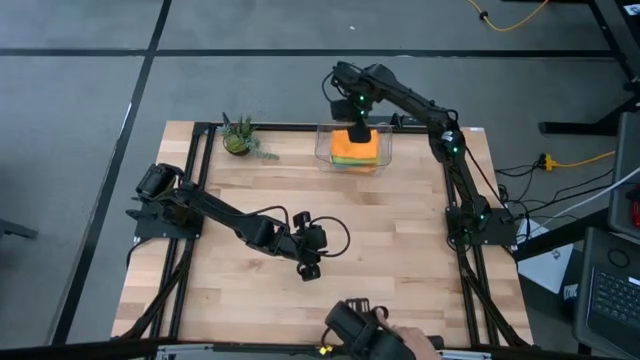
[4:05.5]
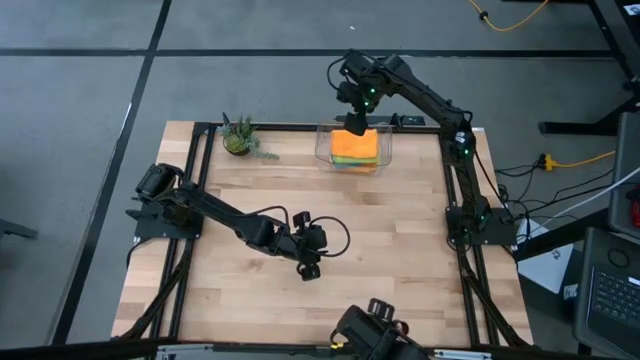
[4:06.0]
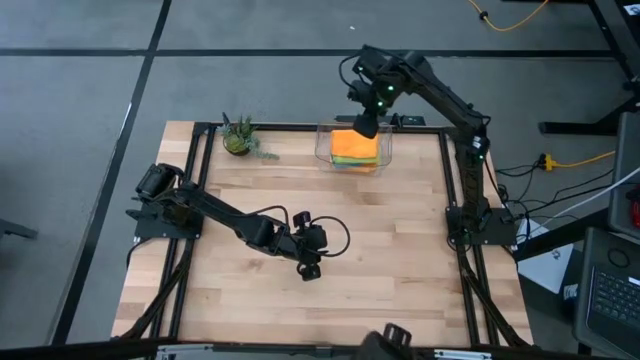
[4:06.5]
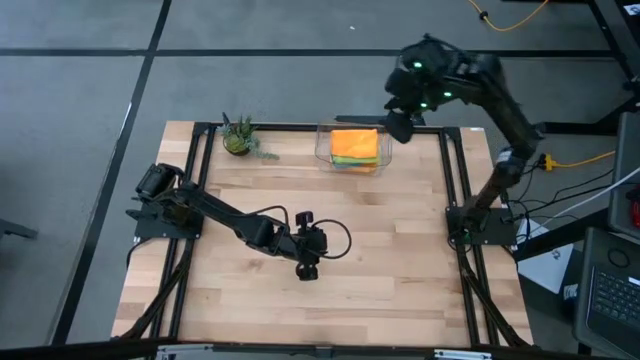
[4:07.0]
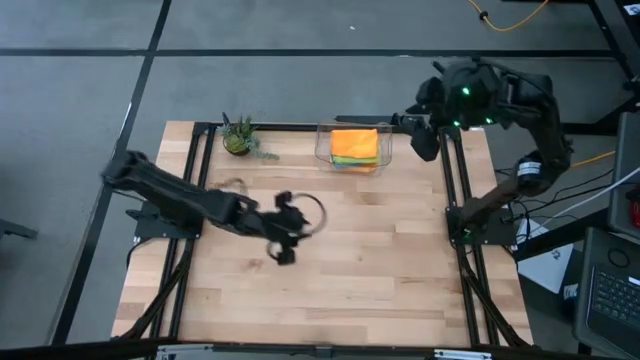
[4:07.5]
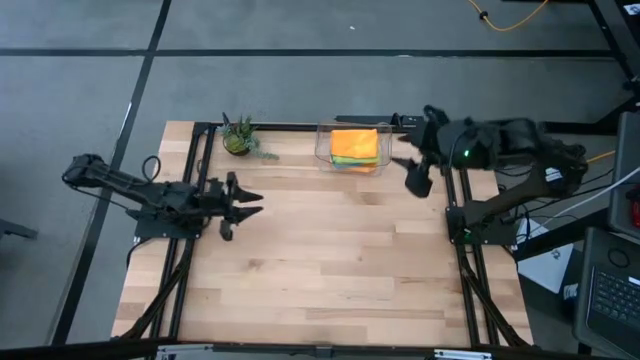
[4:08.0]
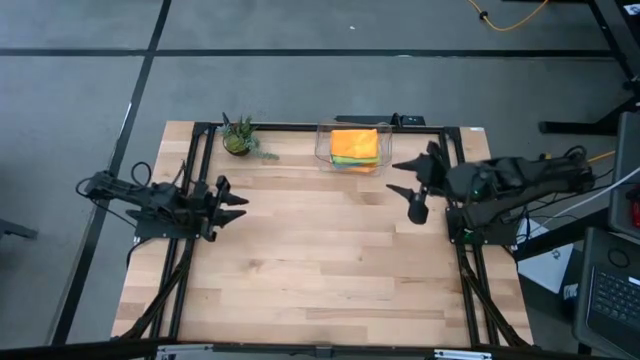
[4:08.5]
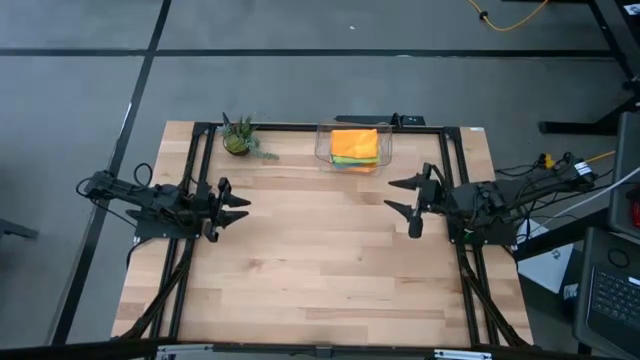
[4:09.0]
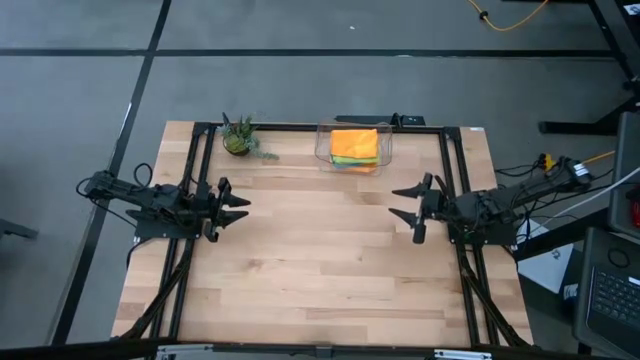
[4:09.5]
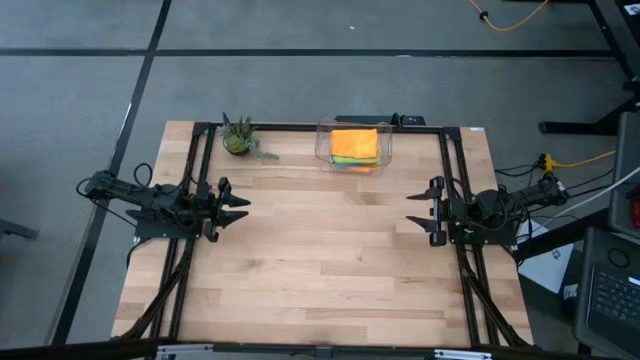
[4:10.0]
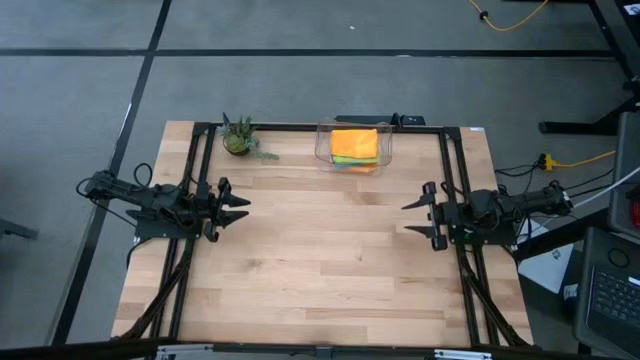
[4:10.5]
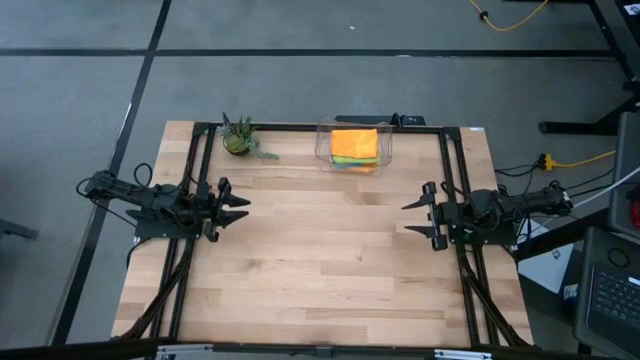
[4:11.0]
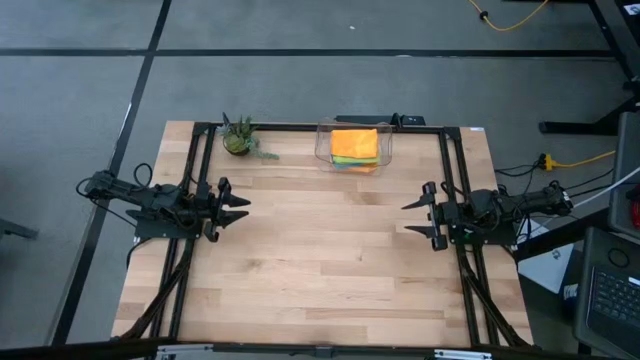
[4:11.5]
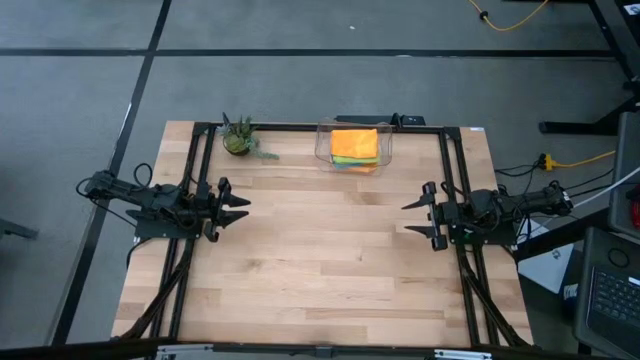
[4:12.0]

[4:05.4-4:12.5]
Task: Fold microfiber towels
Return to Home Position

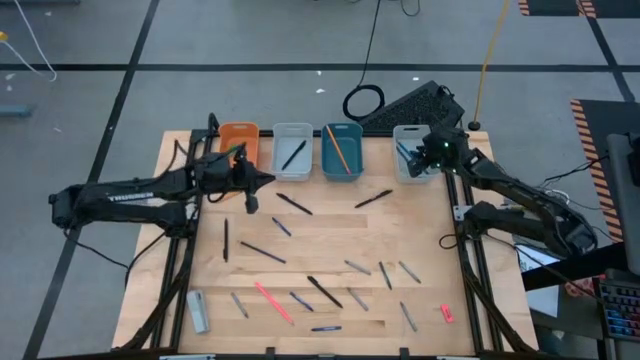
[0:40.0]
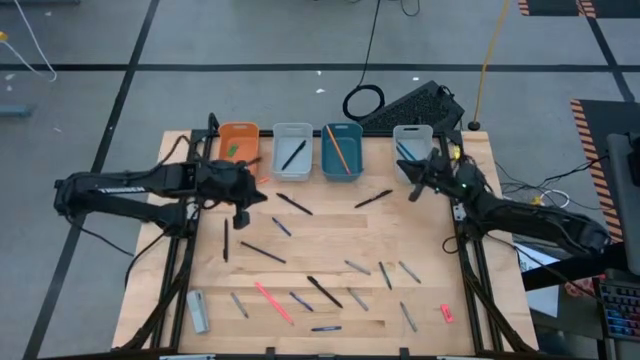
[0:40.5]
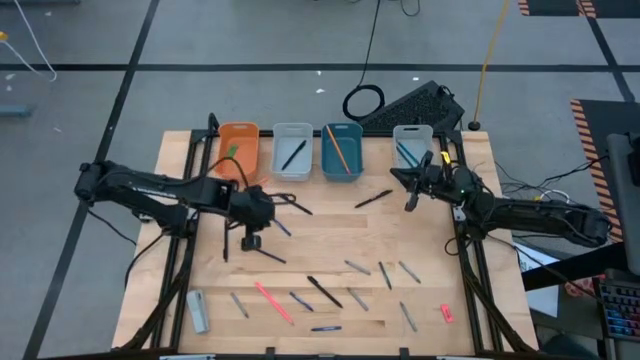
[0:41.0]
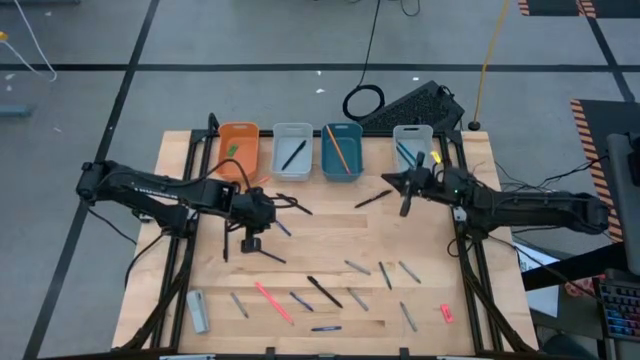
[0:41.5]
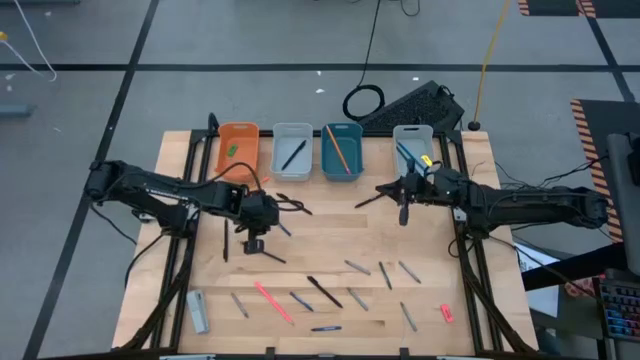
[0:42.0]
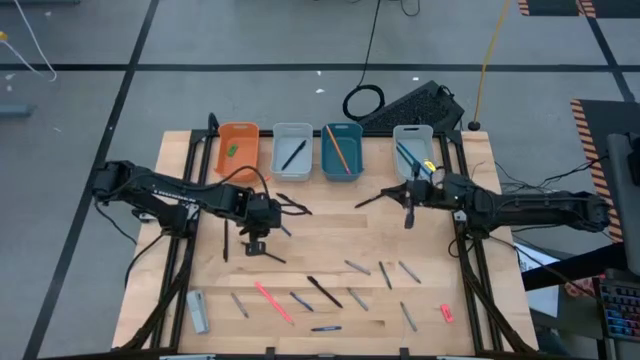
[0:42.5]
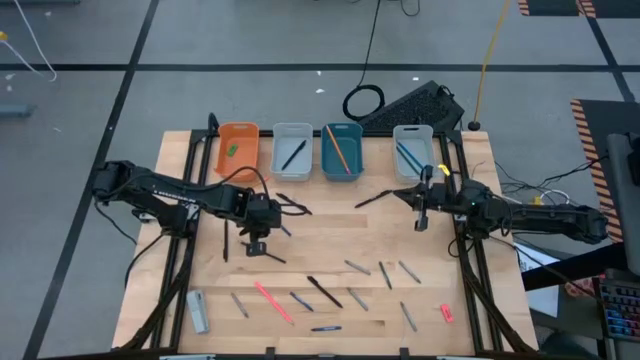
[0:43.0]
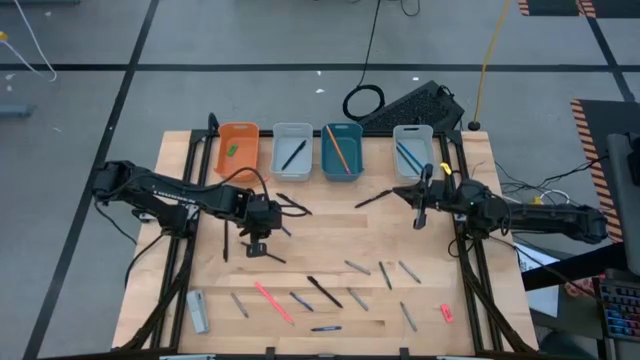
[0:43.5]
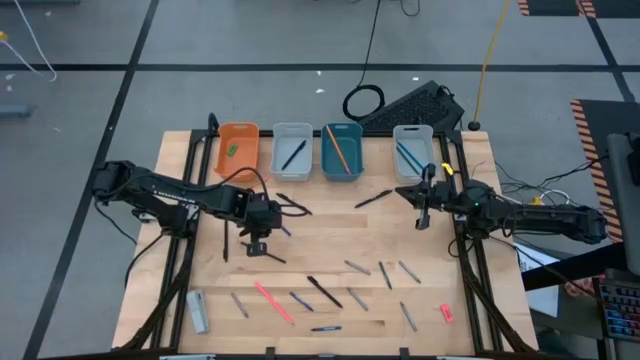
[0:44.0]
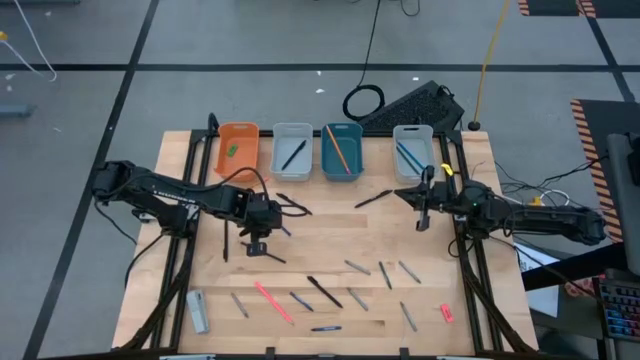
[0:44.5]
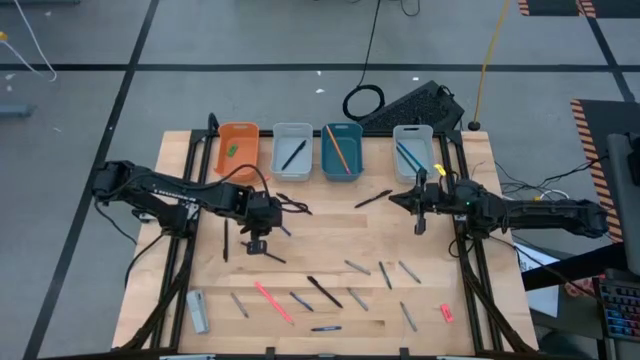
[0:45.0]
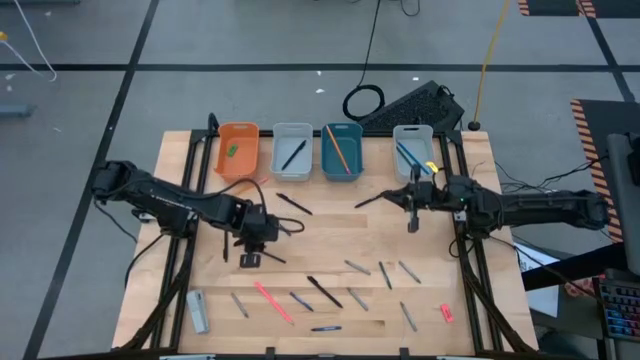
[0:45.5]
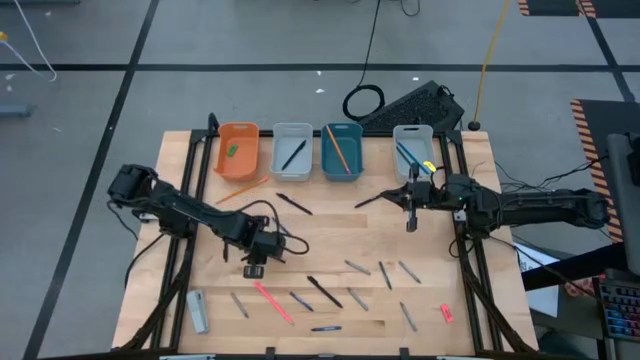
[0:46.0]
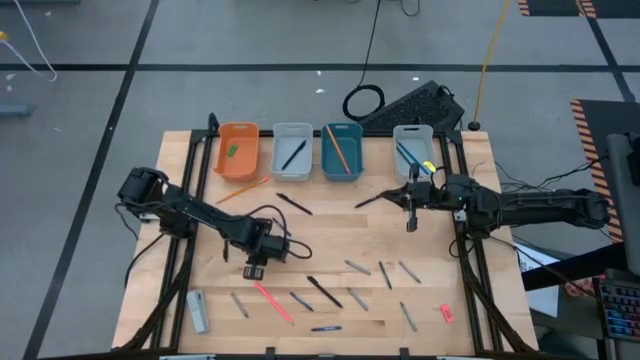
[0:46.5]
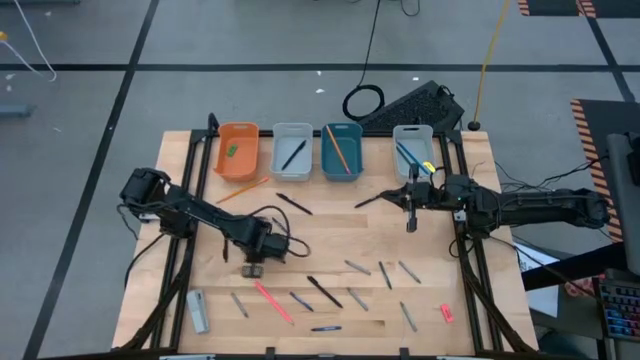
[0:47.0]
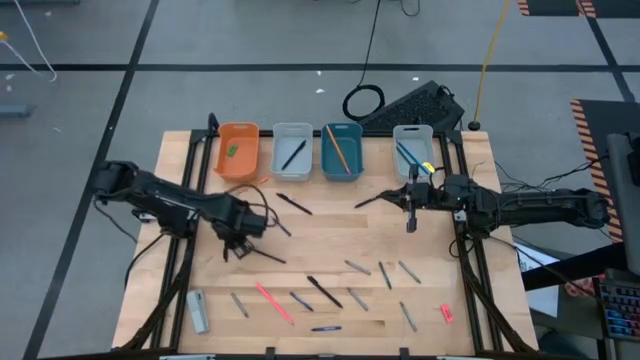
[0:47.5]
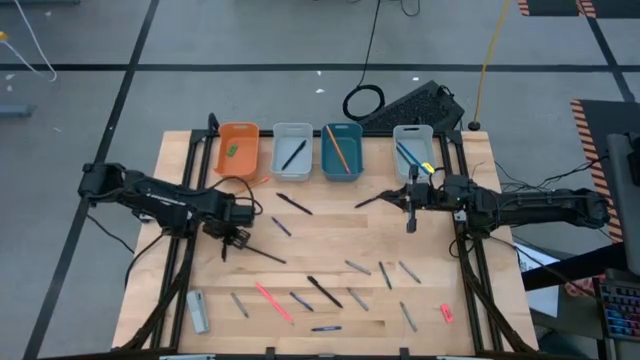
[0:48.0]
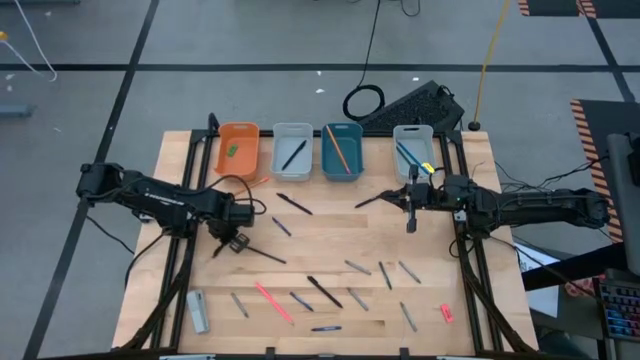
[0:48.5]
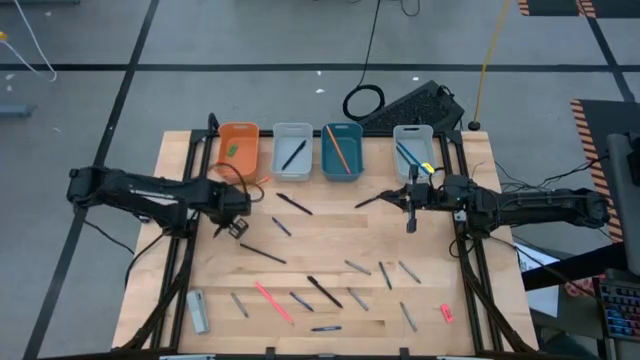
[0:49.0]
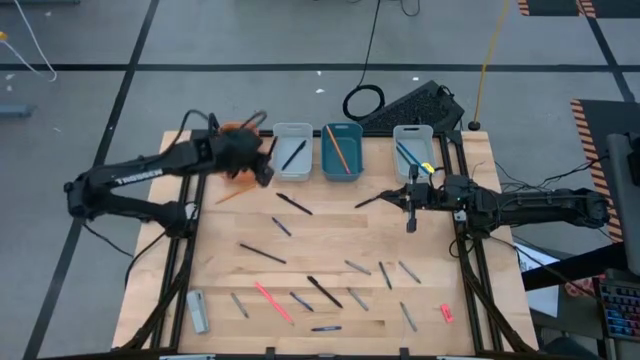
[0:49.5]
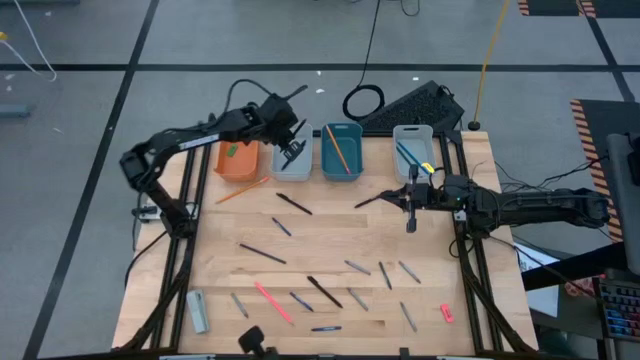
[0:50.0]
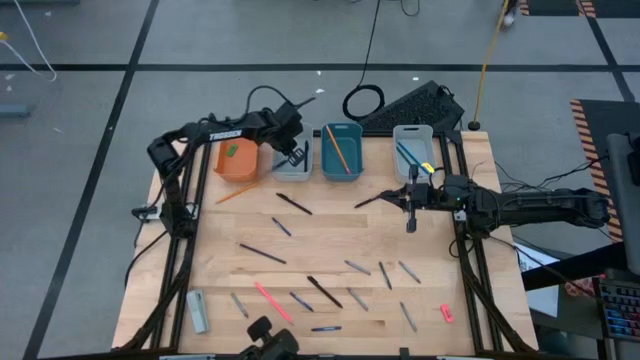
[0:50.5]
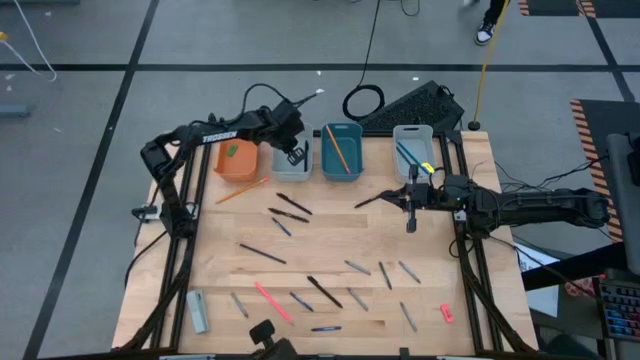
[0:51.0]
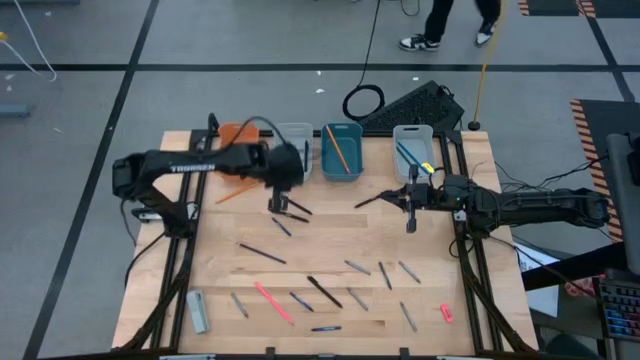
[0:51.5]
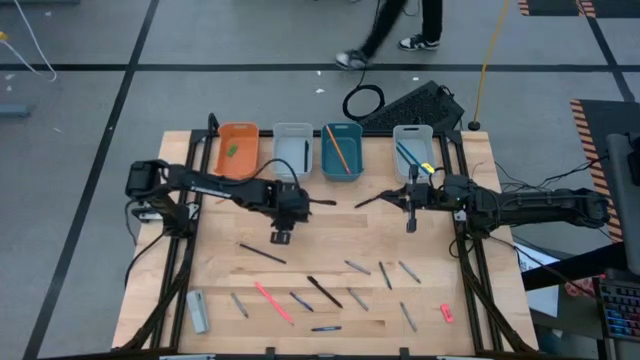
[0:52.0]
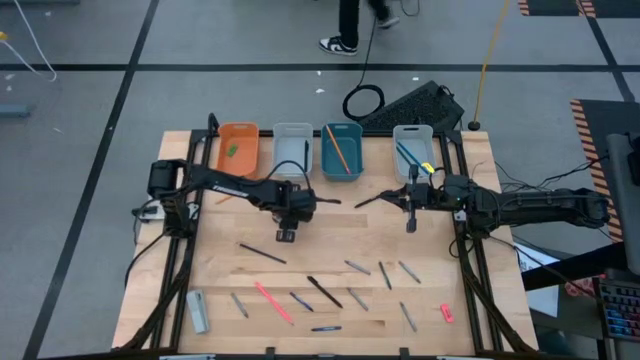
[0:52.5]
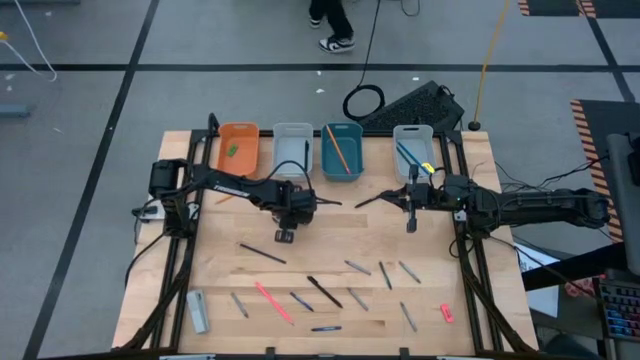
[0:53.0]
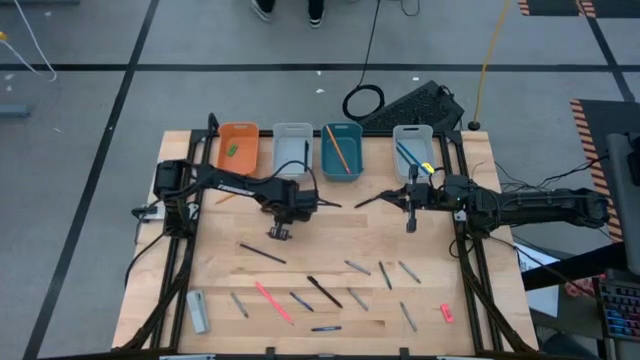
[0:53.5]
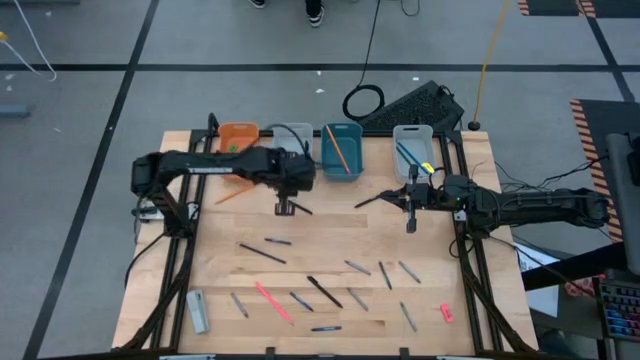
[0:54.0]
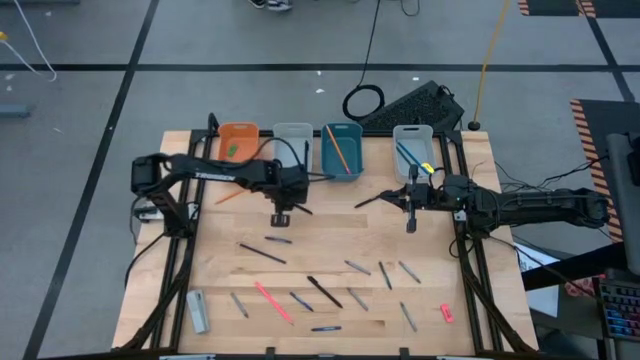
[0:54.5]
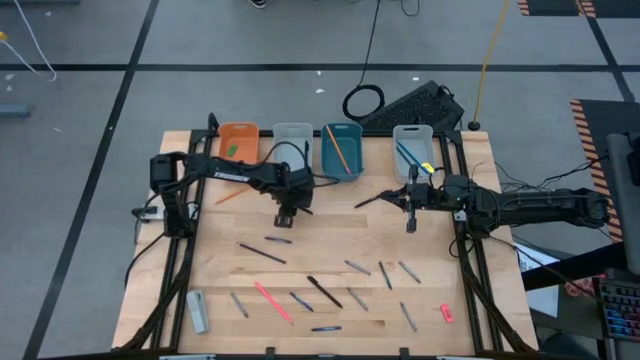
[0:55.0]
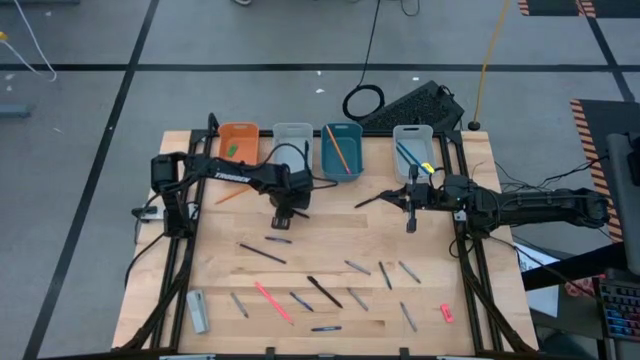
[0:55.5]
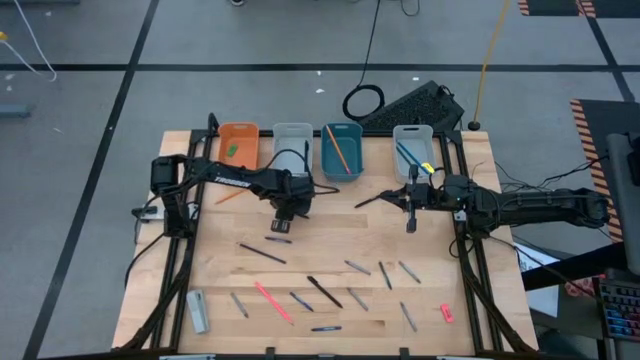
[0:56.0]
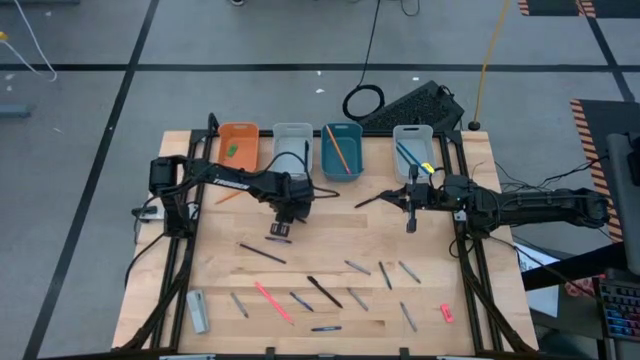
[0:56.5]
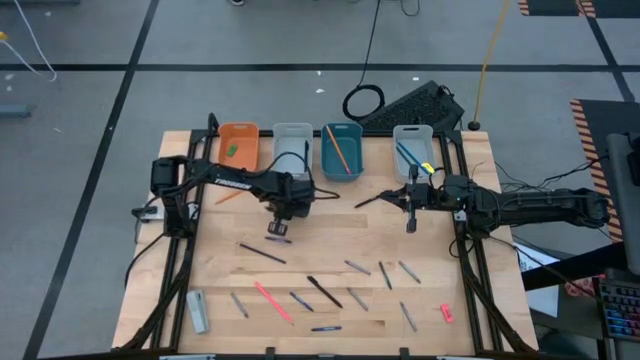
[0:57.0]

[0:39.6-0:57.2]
Task: Sort crayons/erasers/pens/pencils in bins
Put the black pen into the left gray bin
